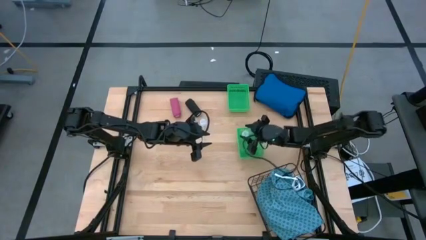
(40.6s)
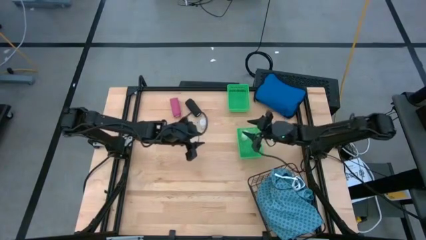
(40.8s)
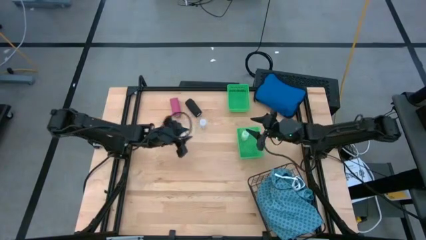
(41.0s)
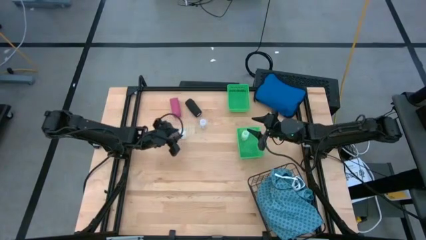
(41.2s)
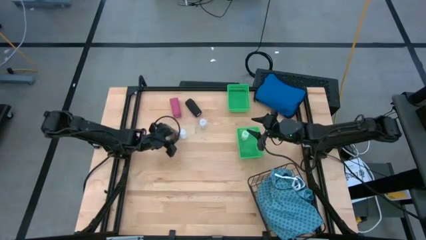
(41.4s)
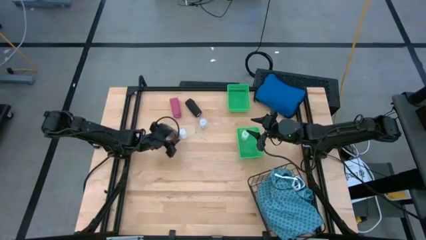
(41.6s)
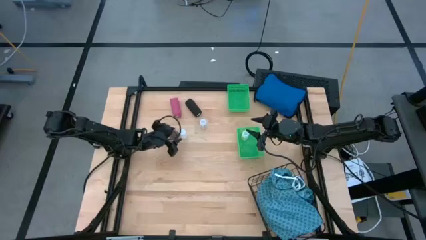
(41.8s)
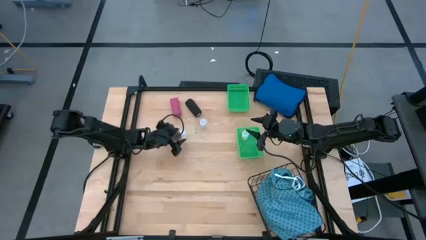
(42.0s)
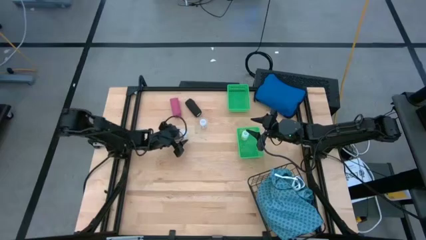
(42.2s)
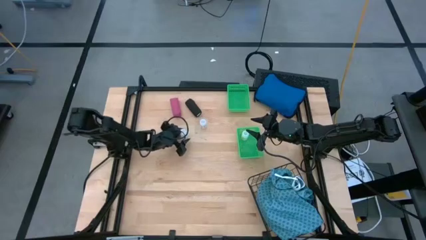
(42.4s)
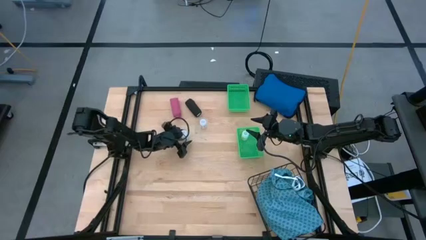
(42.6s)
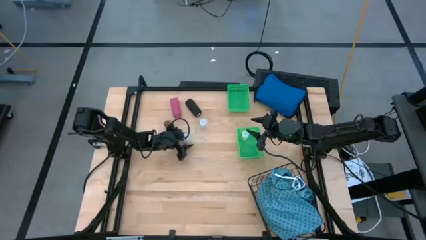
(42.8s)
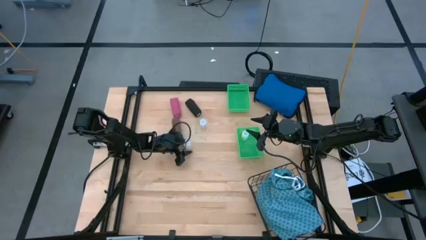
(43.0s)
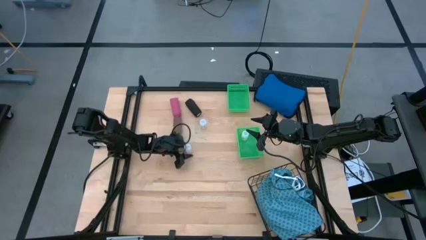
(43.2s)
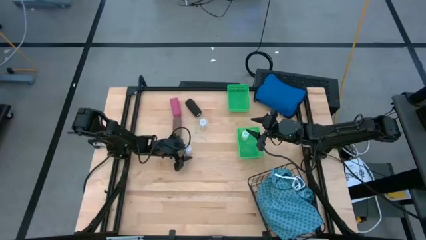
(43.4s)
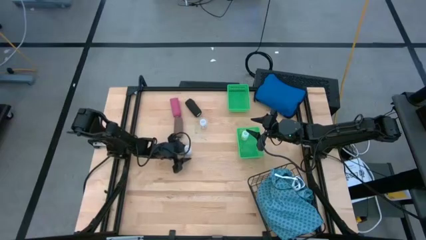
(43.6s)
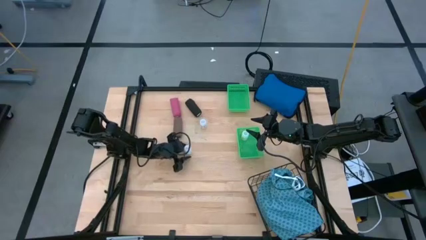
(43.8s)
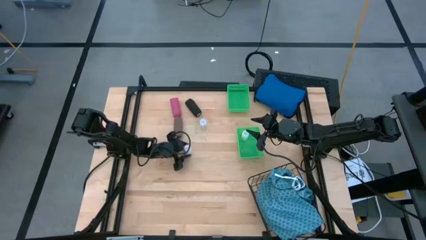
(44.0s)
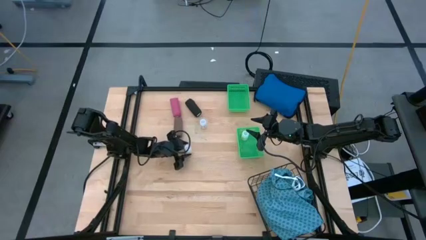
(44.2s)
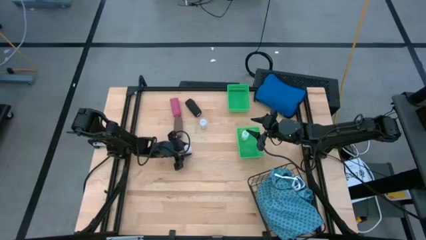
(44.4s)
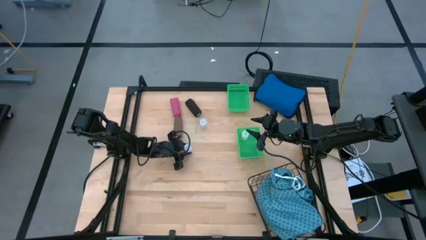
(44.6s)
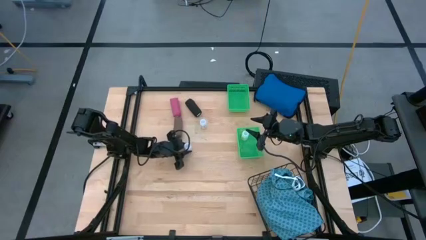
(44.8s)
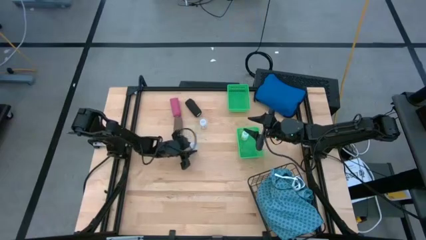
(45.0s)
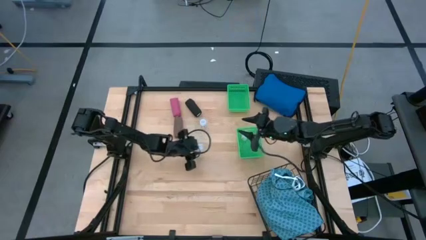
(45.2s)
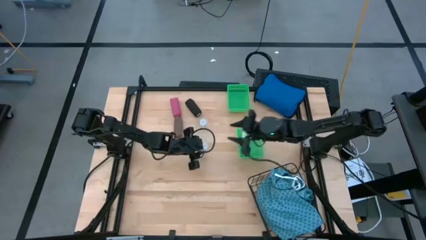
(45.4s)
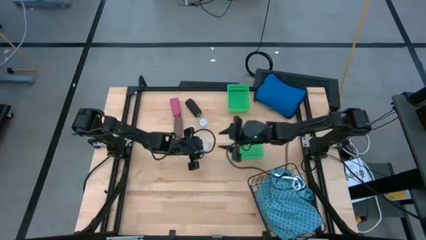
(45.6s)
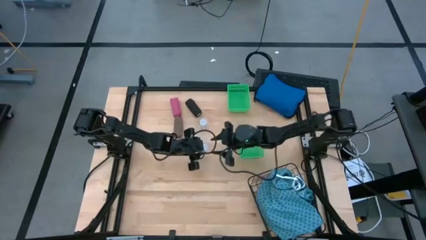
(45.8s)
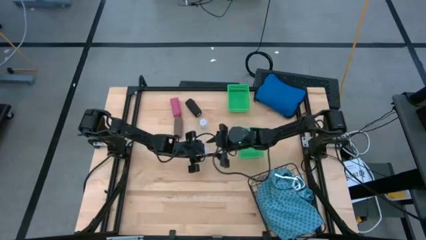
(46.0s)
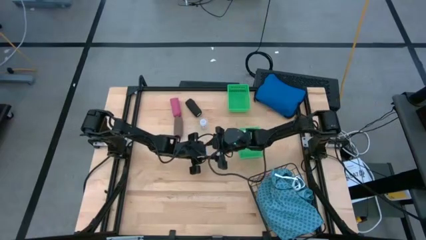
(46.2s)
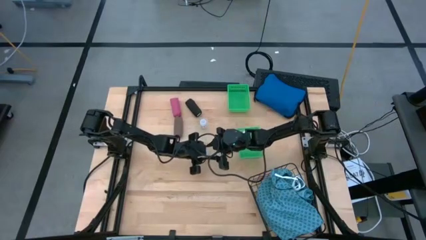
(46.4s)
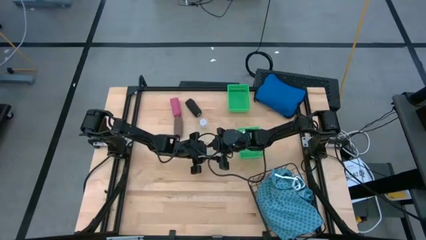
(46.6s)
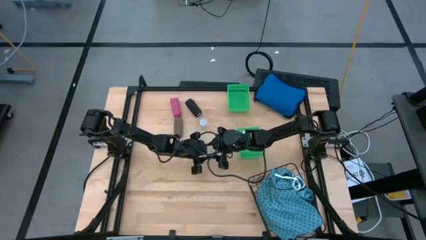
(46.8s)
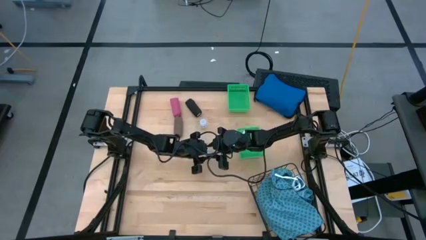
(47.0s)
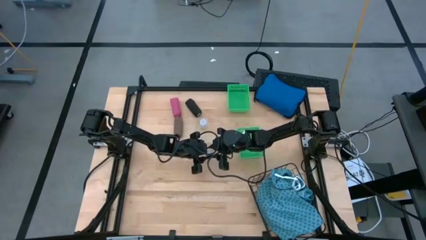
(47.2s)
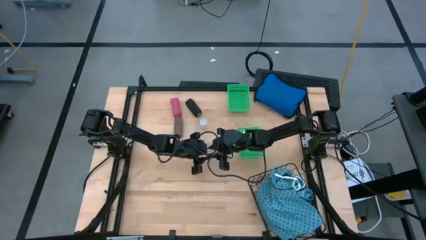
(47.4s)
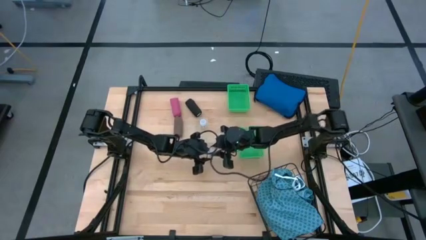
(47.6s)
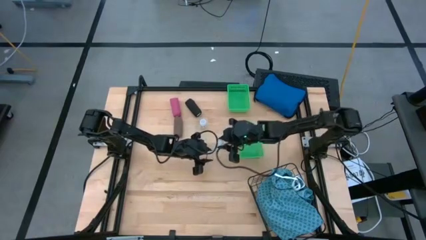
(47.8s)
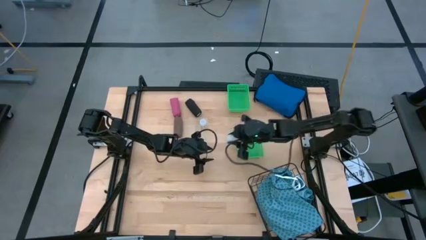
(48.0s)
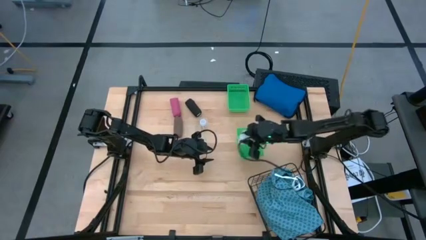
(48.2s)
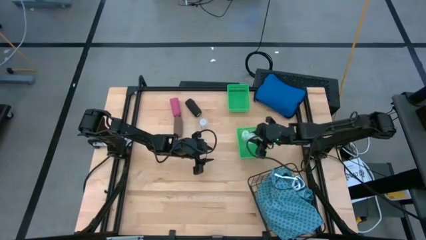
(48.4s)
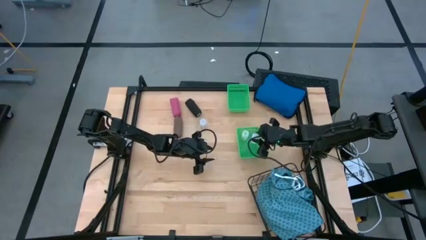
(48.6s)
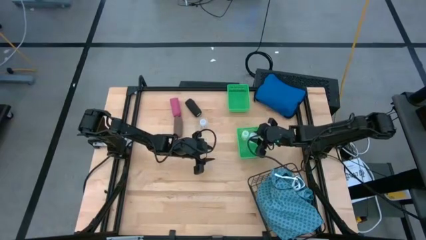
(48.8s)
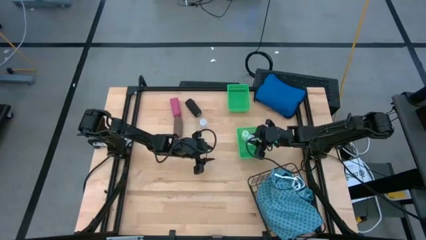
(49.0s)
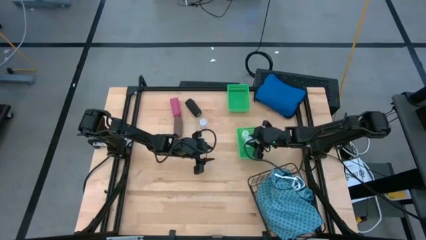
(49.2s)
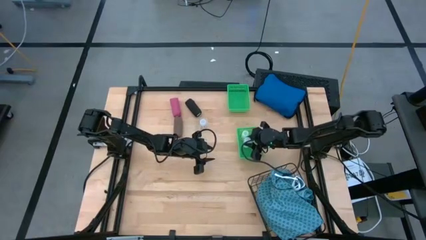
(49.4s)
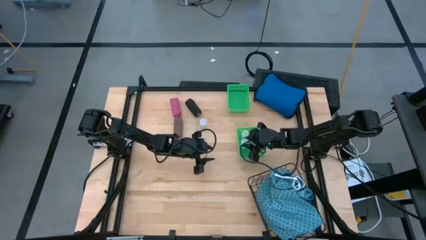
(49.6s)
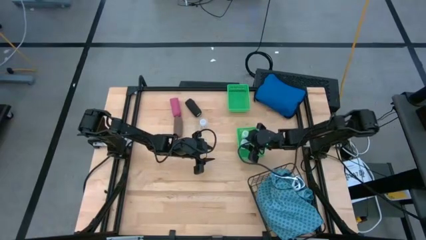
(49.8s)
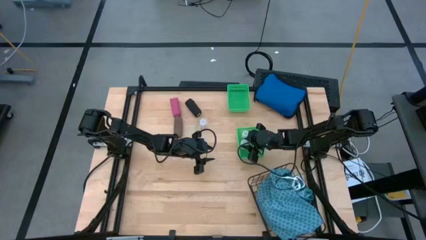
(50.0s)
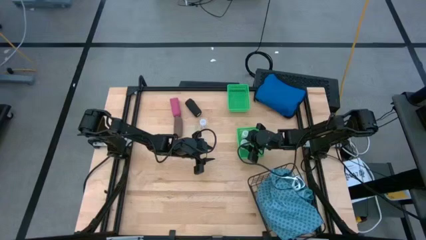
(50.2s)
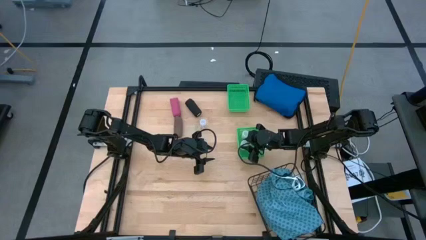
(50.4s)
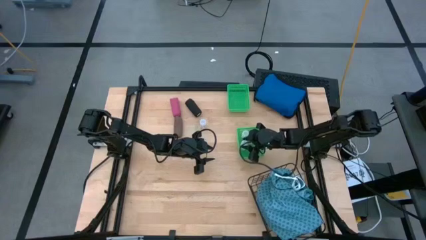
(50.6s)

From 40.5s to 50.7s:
Task: Pick & Place Medicine items
Put the left transparent pill bottle into the bottom green bin

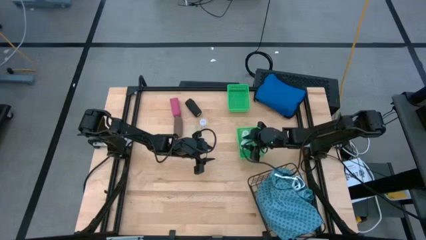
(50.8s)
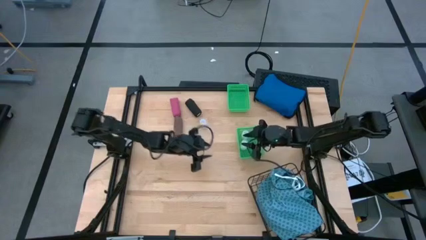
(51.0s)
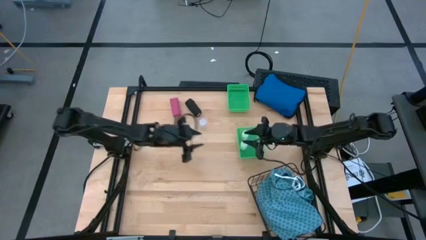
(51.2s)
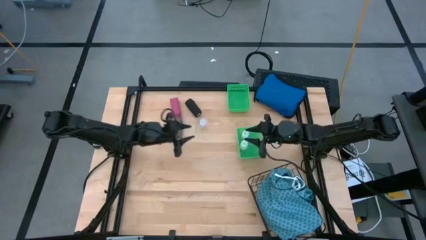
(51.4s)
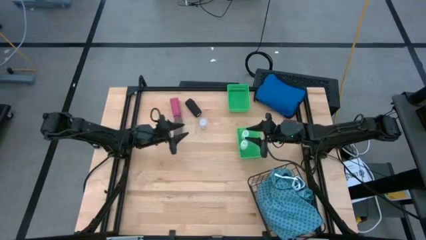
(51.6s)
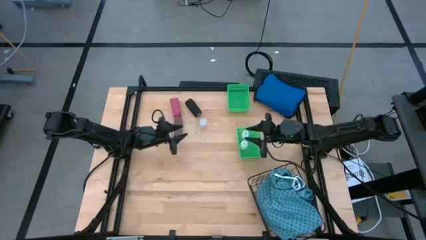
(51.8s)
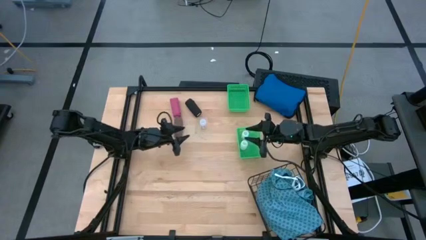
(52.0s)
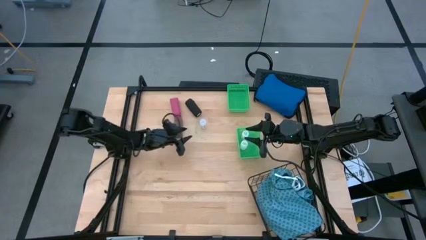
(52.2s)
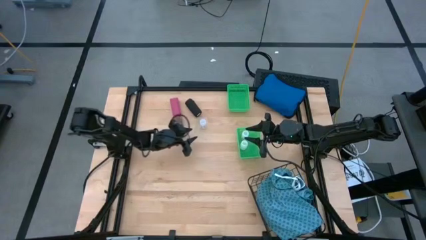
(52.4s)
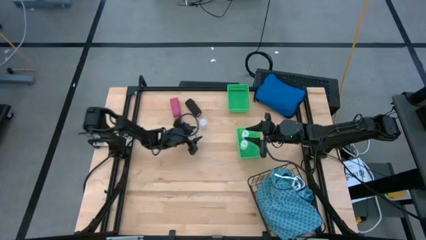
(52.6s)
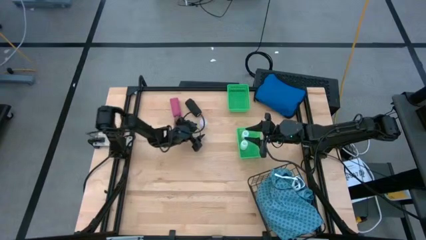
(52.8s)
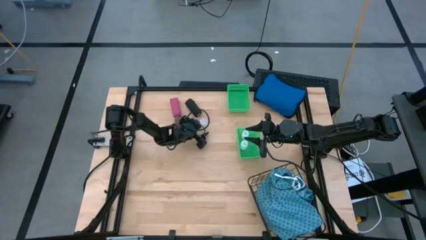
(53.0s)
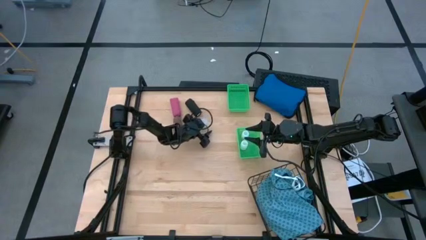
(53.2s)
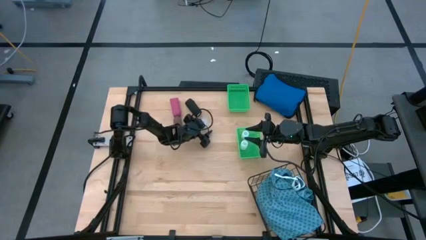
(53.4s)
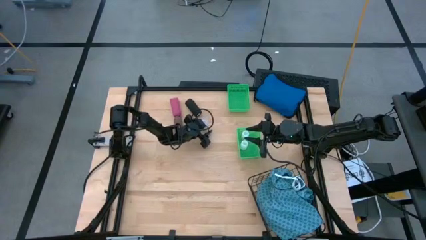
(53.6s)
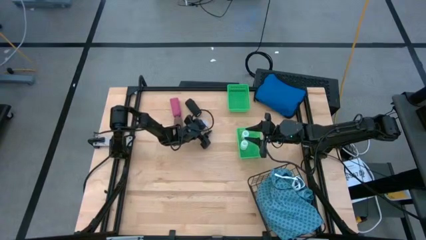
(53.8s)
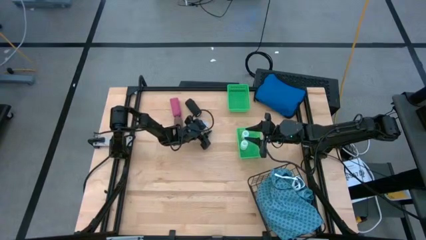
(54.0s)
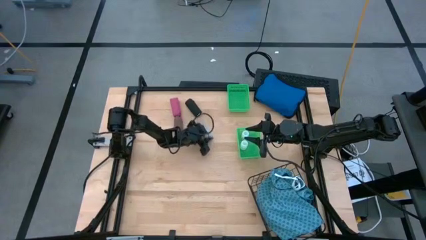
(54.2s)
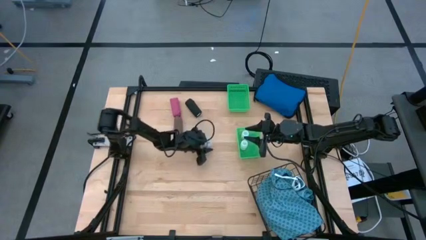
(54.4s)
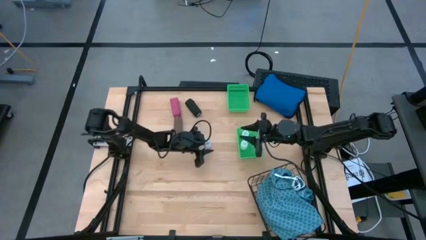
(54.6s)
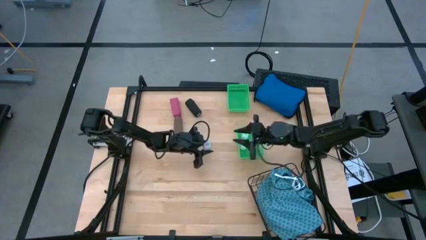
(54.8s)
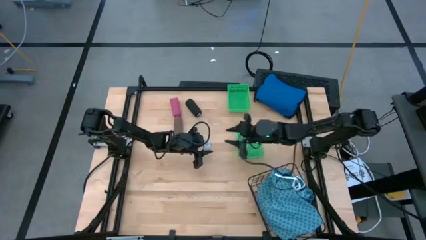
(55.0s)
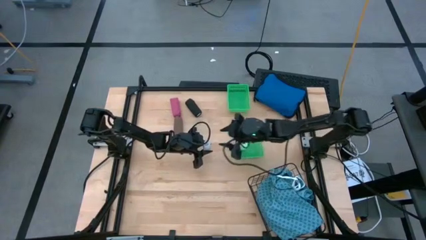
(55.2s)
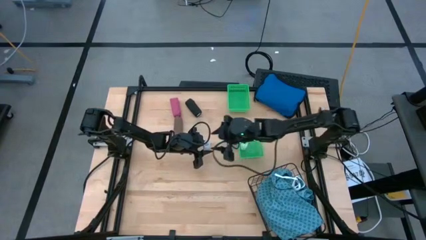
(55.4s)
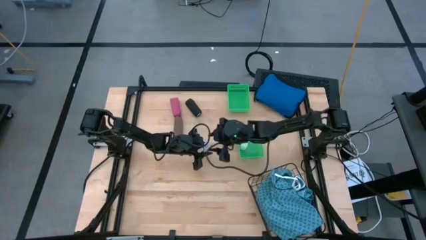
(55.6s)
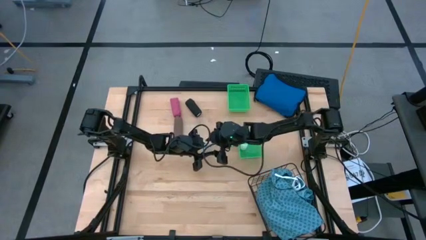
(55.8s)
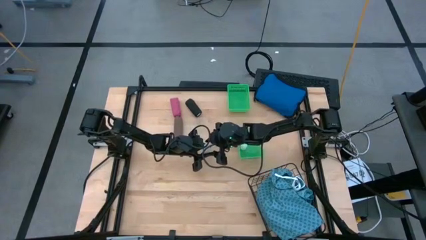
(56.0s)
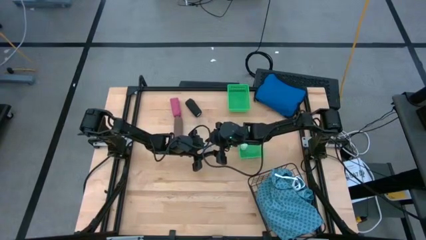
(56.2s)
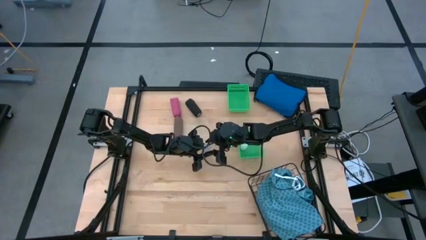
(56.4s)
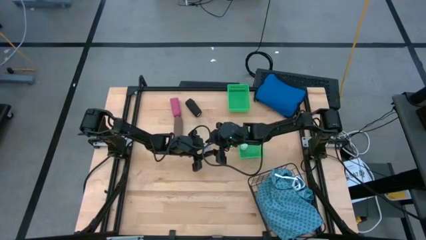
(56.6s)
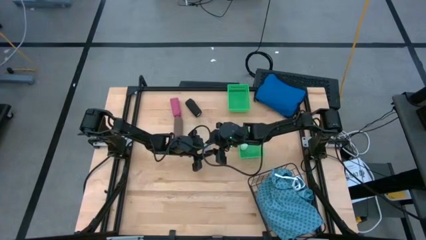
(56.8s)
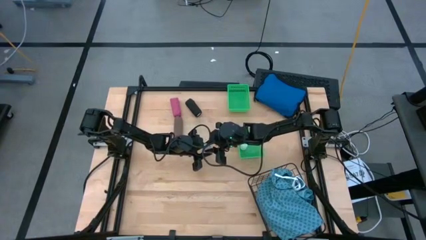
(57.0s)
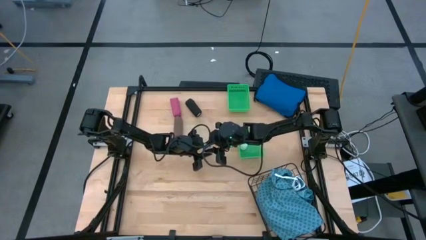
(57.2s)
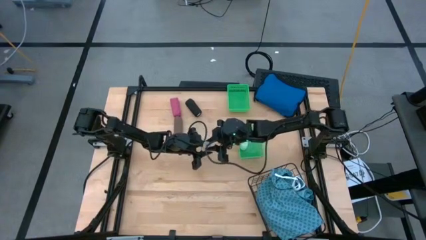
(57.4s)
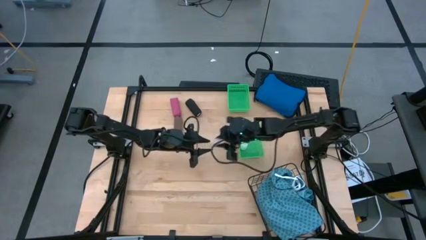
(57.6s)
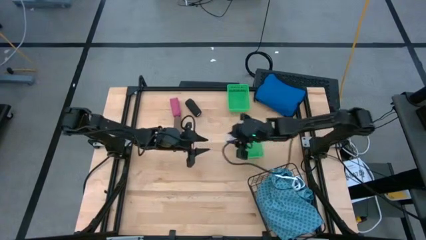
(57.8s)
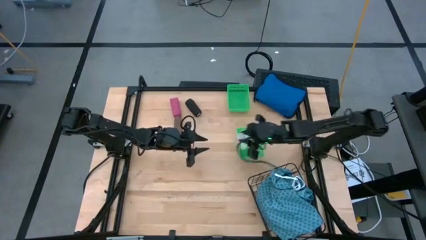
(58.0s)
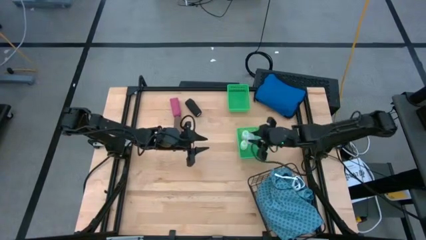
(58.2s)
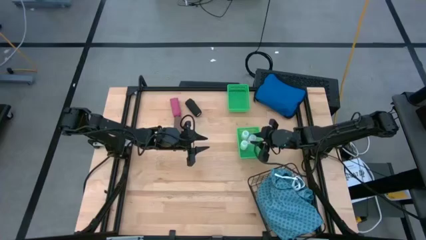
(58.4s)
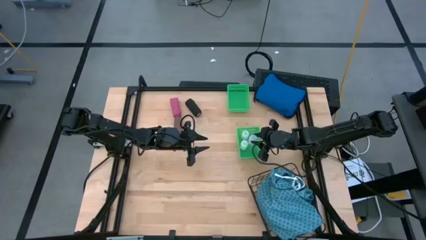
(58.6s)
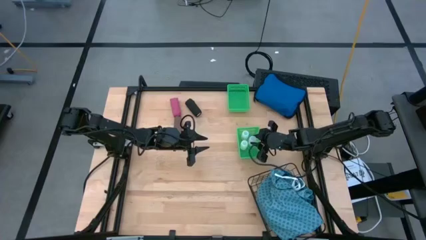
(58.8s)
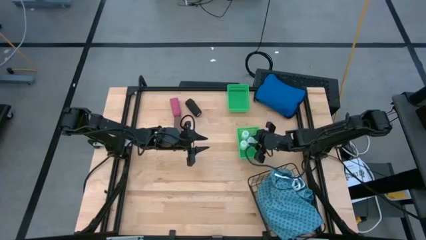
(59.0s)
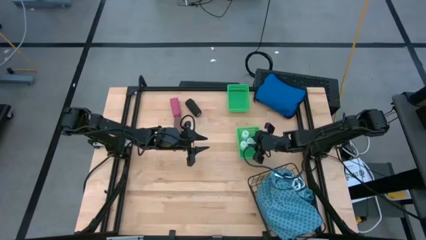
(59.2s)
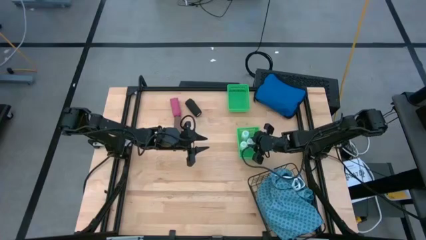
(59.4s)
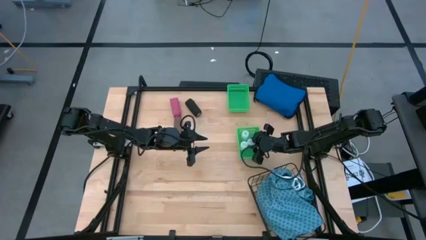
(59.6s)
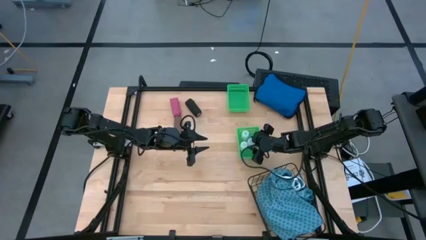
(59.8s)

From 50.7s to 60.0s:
Put the transparent pill bottle into the bottom green bin
